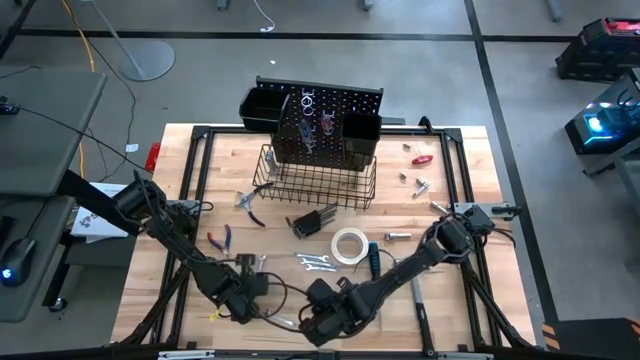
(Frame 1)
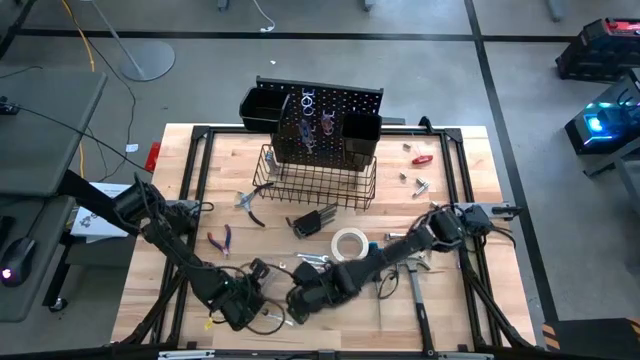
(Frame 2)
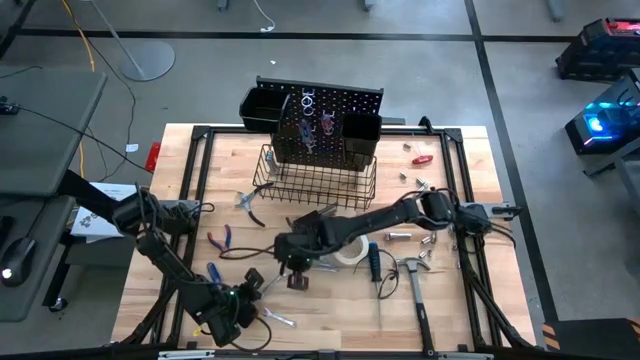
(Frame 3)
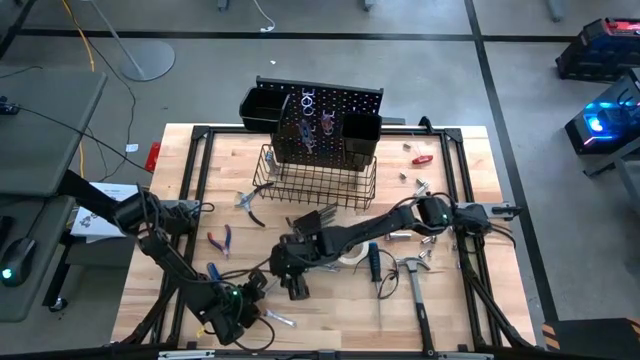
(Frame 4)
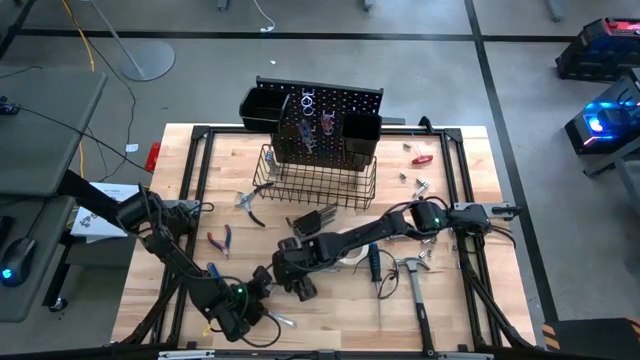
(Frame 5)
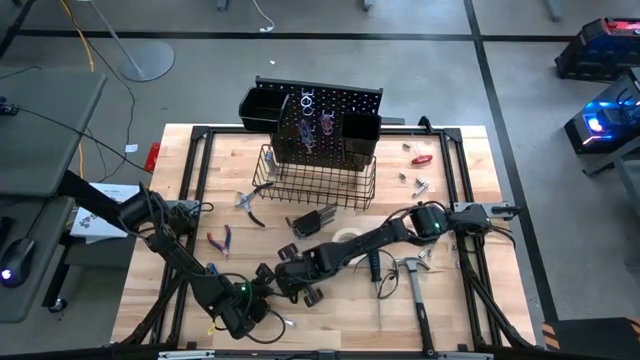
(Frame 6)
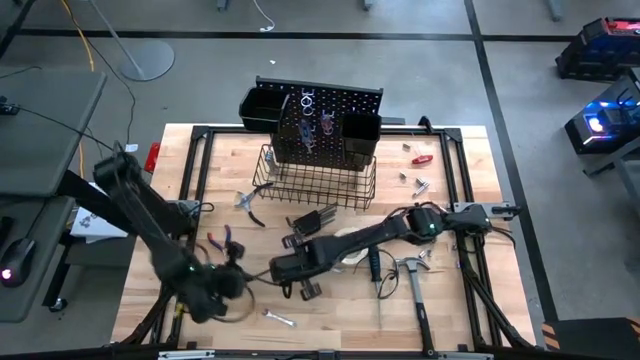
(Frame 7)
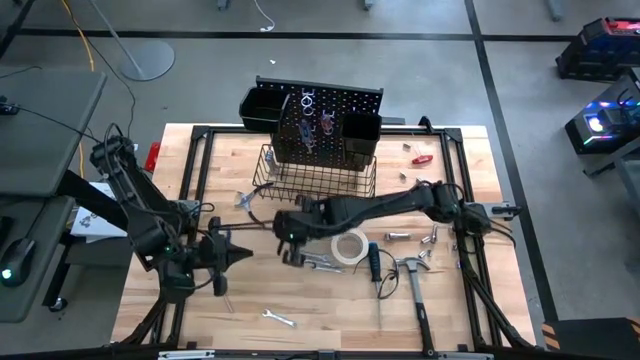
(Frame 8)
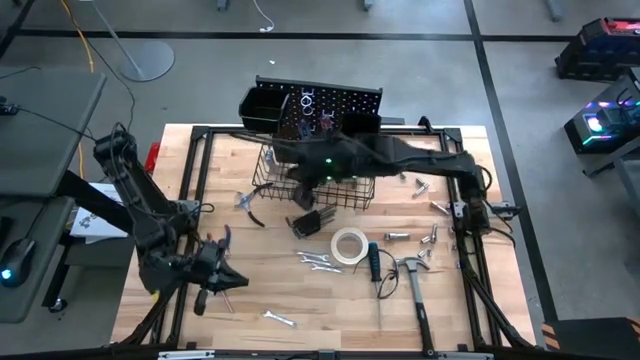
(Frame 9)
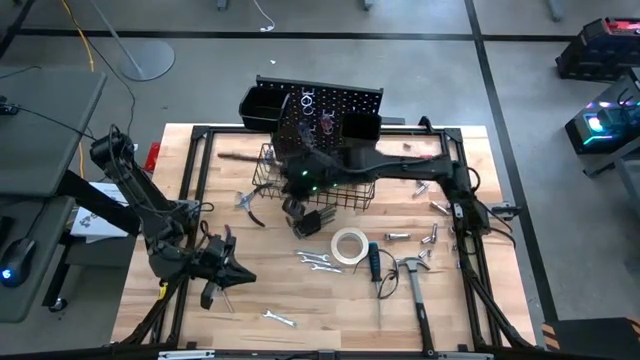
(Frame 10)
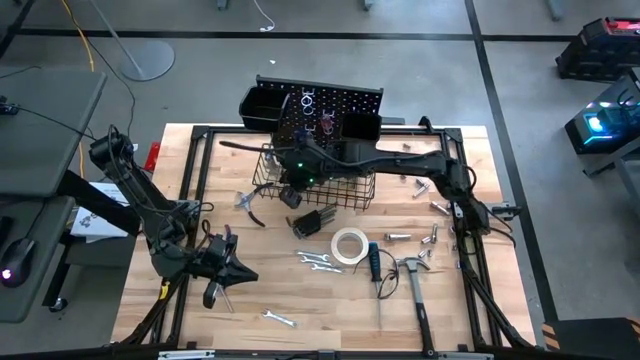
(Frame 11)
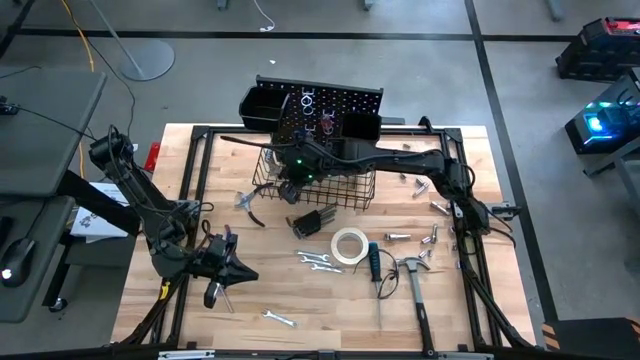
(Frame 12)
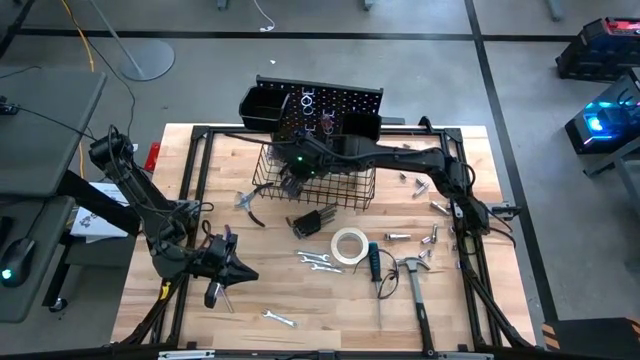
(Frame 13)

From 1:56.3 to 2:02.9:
Task: Hang tools onto peg board
Hang the wrench on the peg board

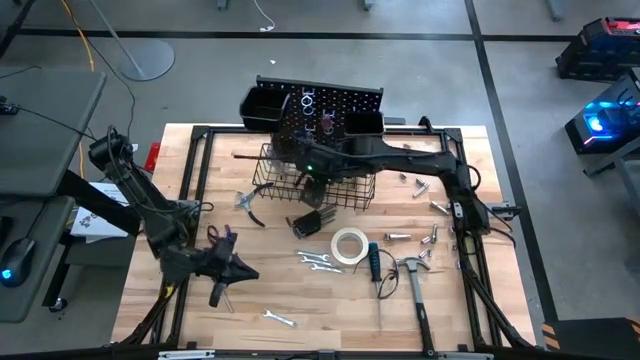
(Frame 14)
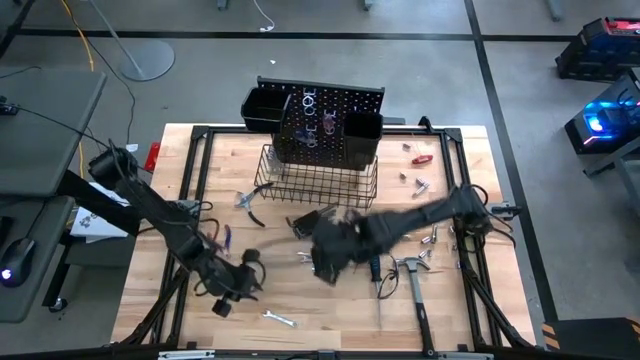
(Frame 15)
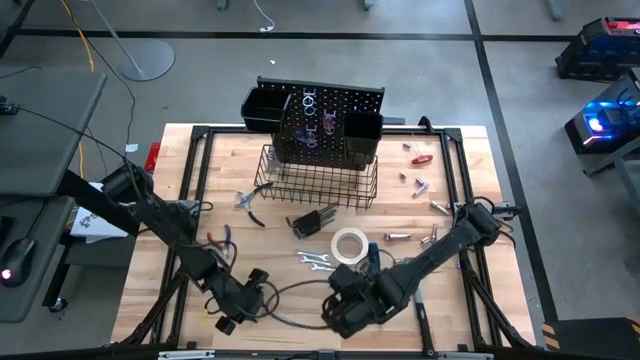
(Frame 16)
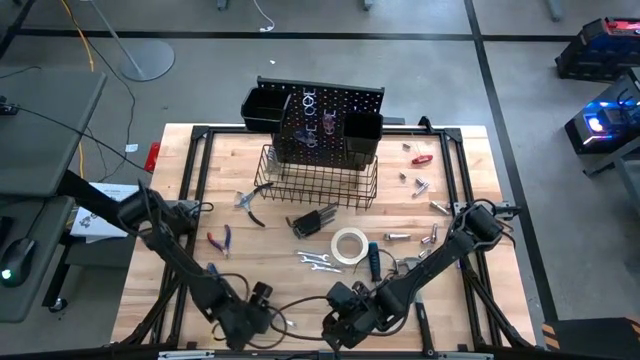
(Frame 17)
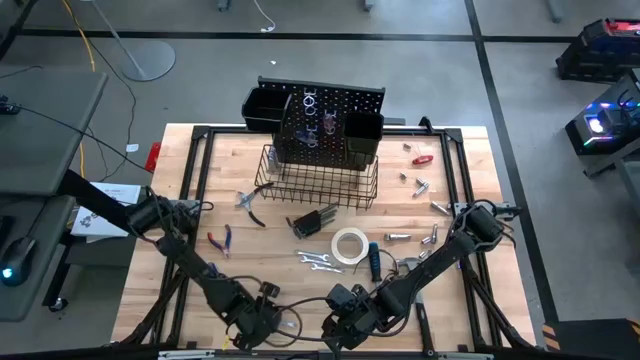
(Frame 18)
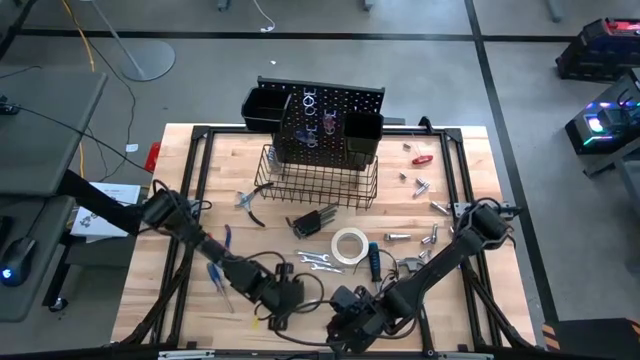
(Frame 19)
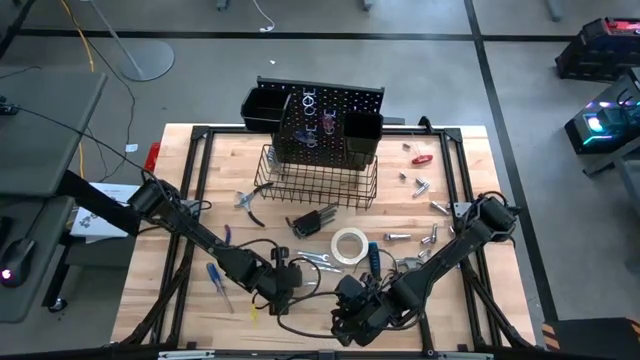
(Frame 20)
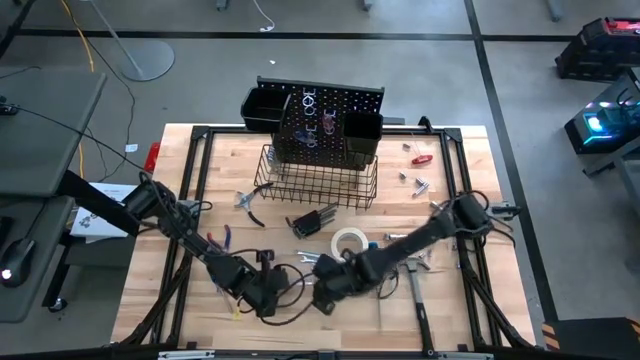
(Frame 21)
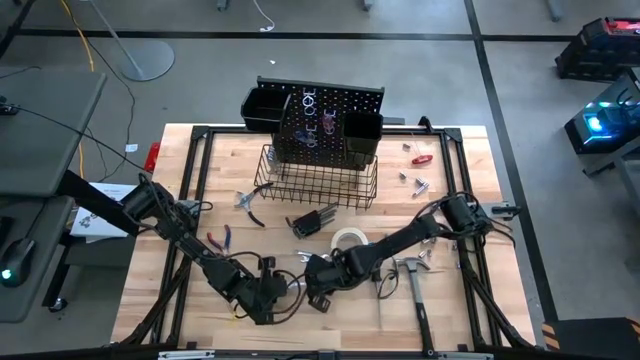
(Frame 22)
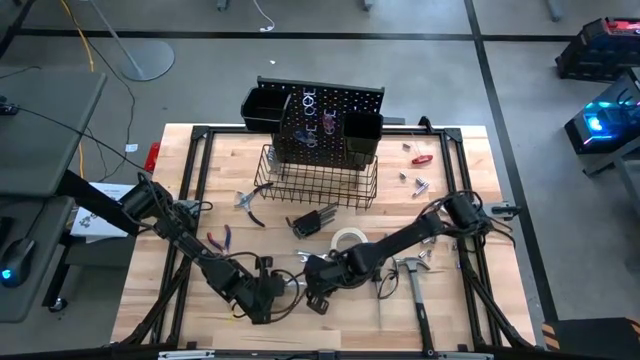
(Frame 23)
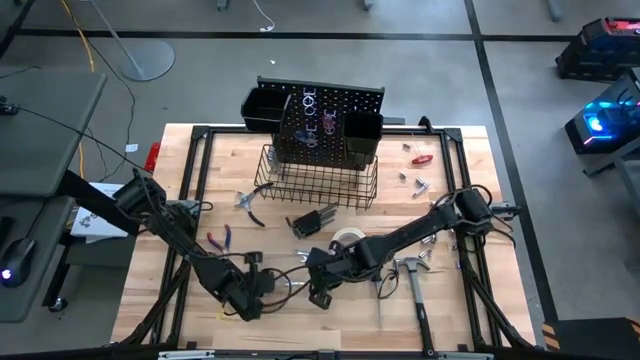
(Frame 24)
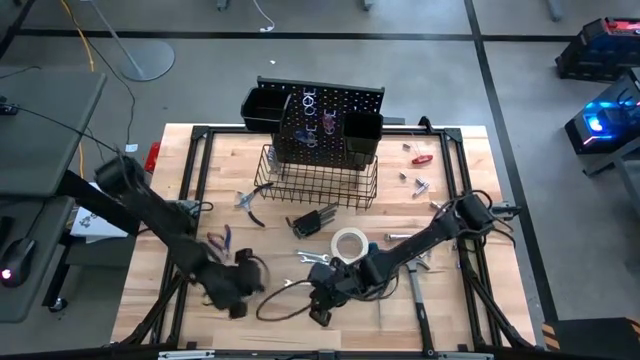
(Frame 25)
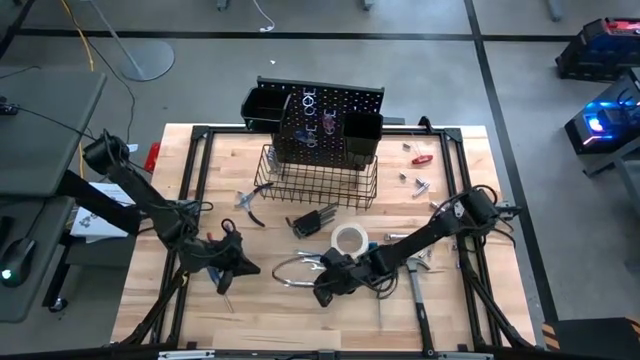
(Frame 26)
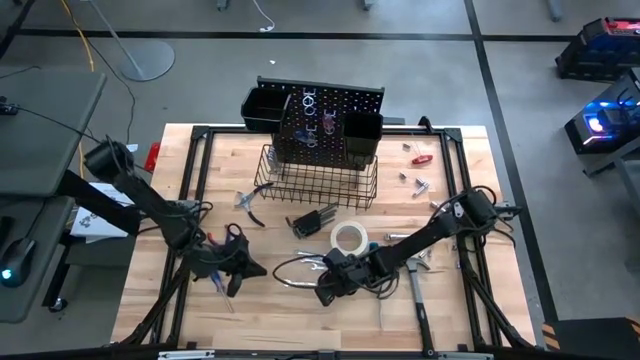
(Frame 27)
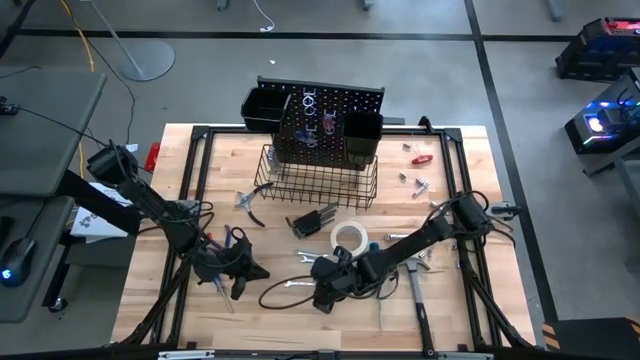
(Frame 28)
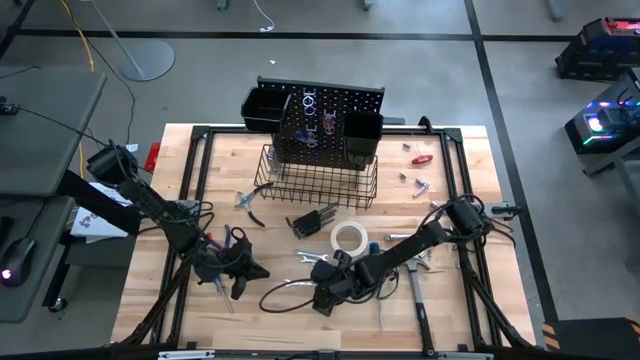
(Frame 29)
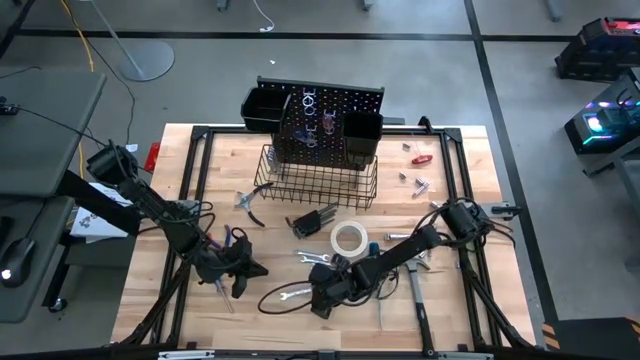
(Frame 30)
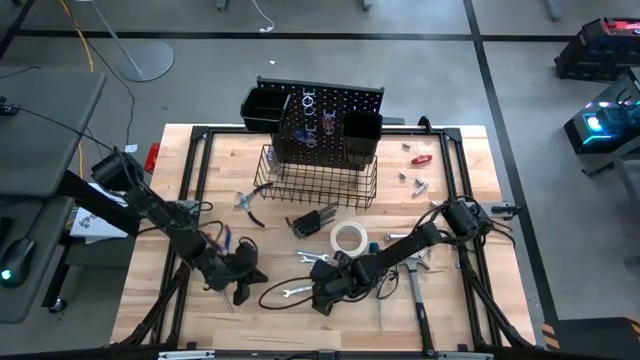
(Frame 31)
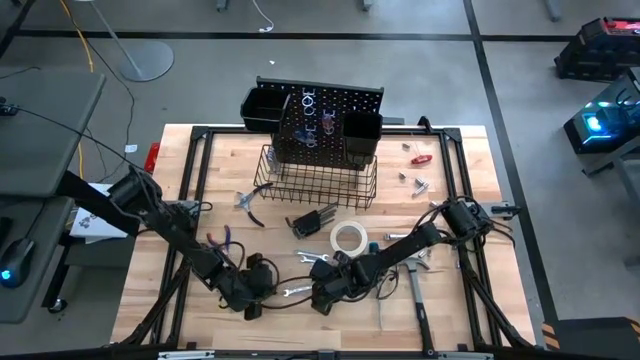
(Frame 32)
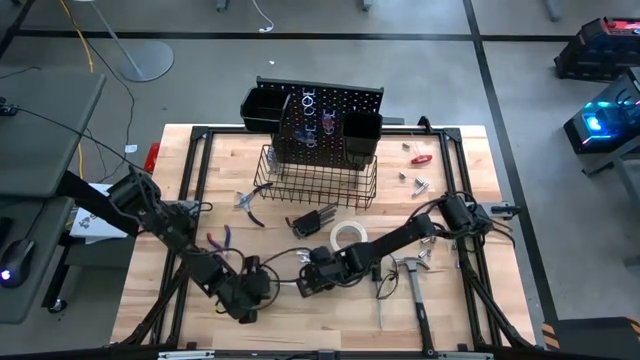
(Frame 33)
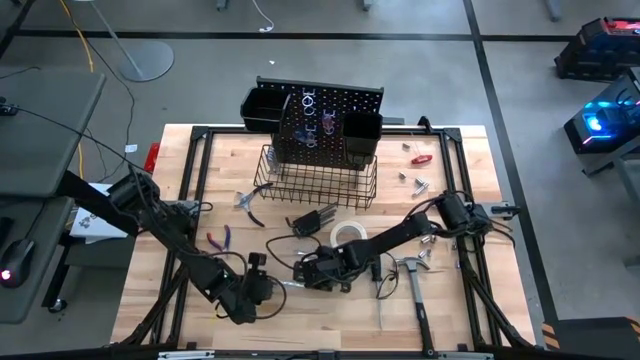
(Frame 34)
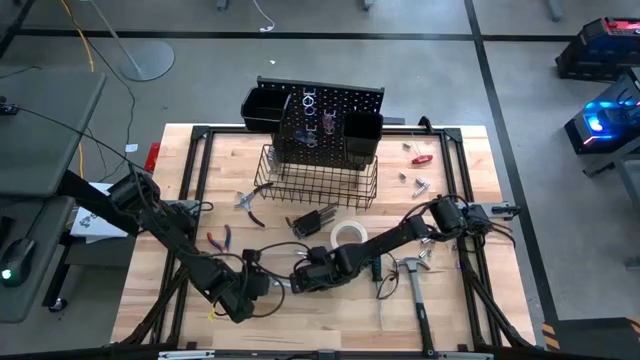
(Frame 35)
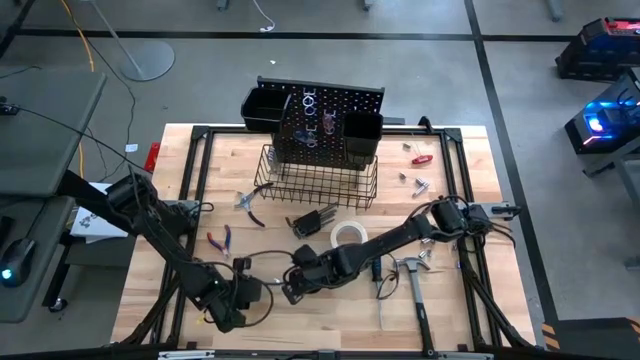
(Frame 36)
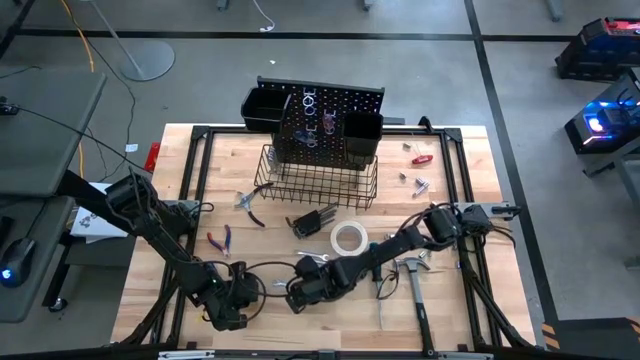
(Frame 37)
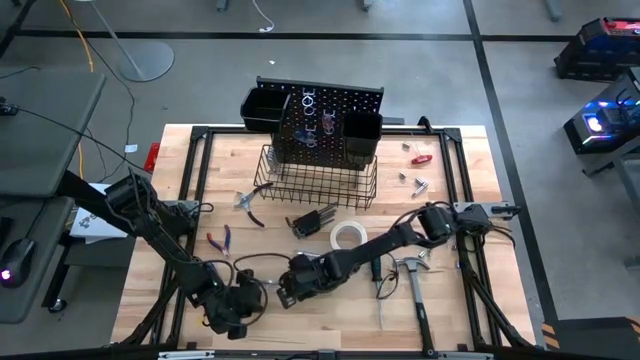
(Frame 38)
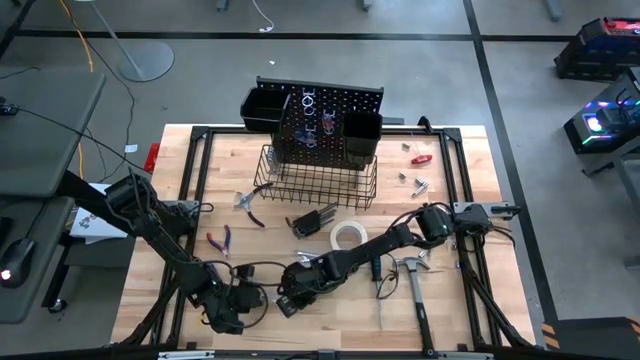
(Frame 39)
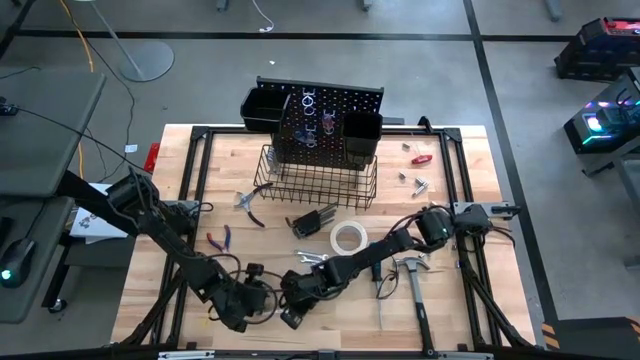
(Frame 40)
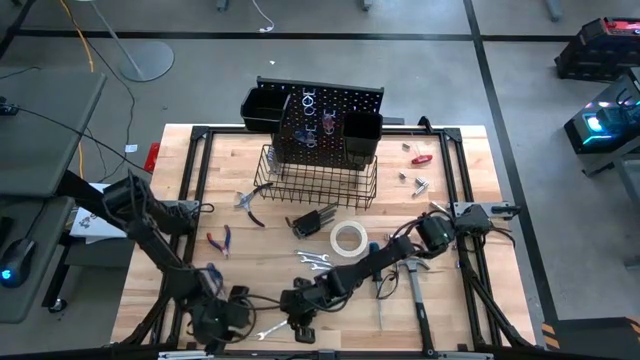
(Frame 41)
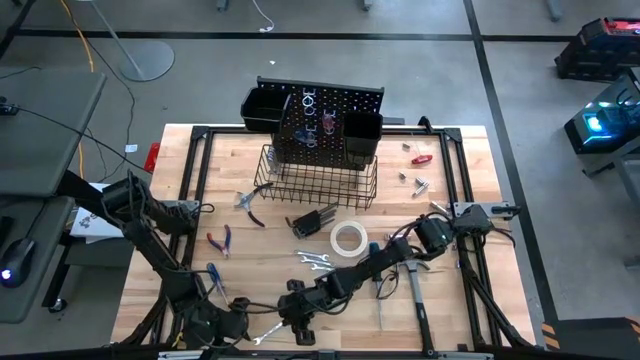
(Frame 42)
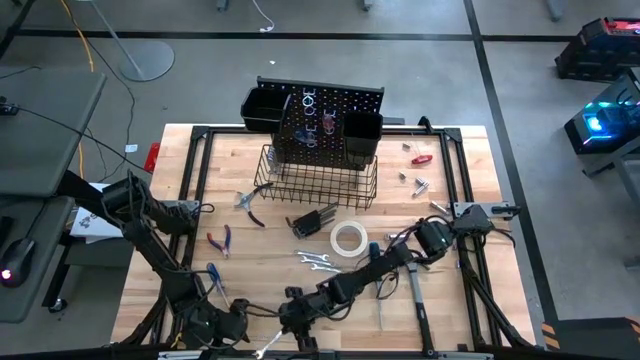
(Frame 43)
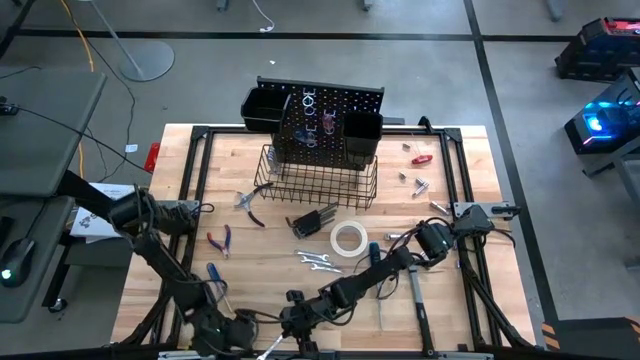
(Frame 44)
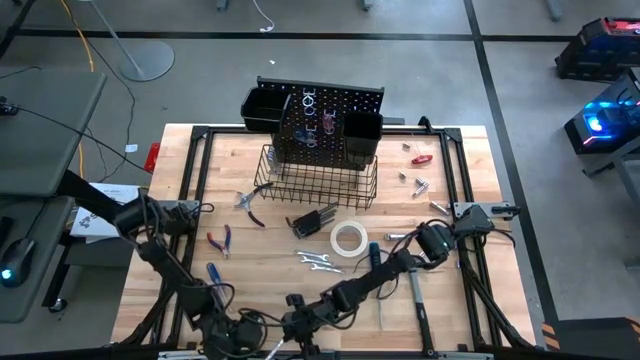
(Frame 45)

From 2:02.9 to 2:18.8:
Hang the wrench on the peg board
